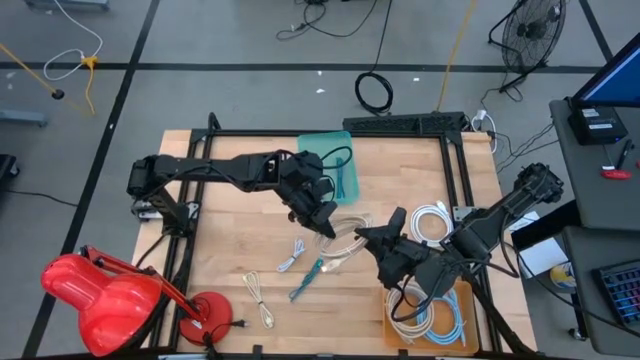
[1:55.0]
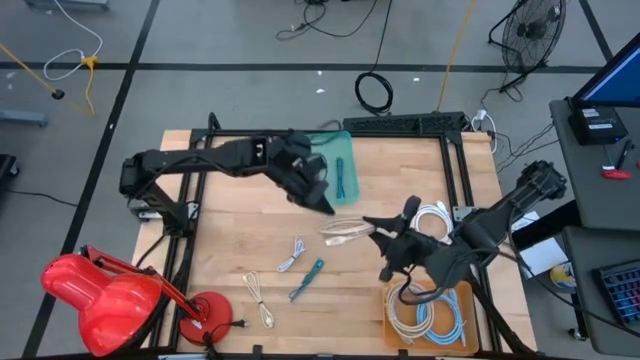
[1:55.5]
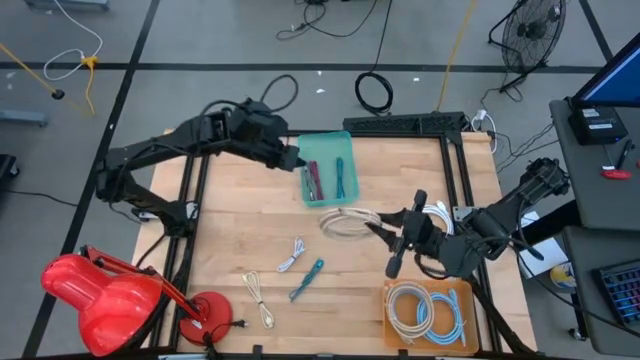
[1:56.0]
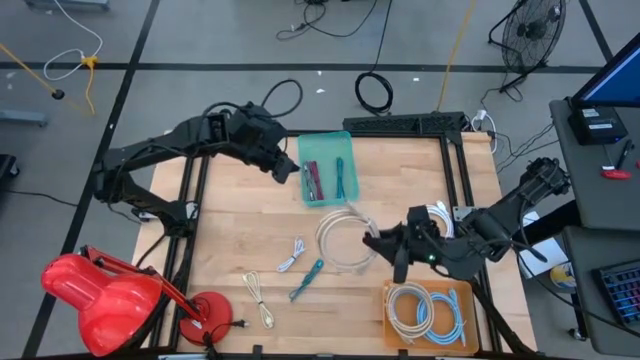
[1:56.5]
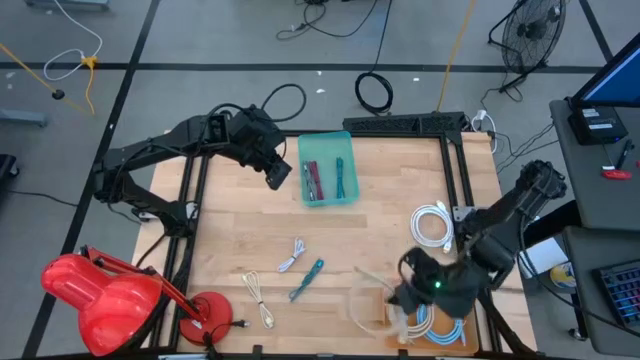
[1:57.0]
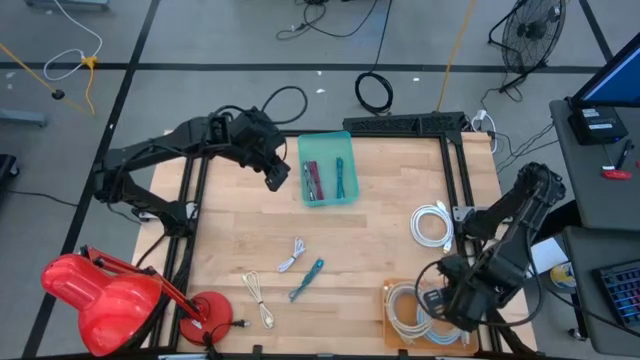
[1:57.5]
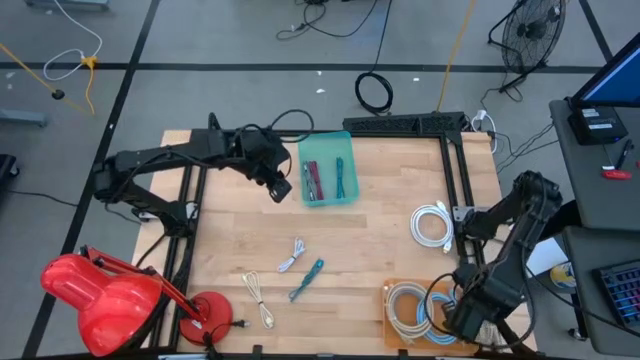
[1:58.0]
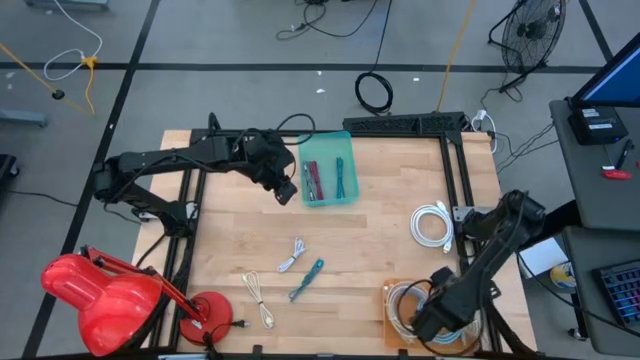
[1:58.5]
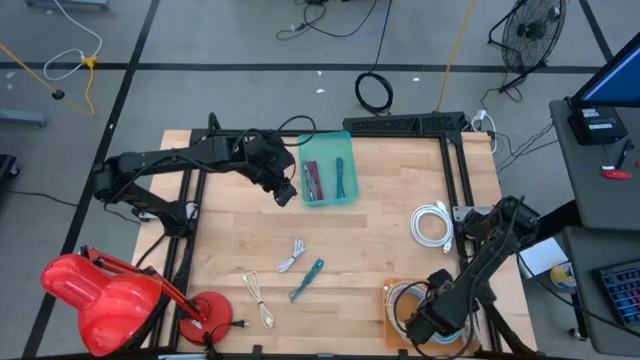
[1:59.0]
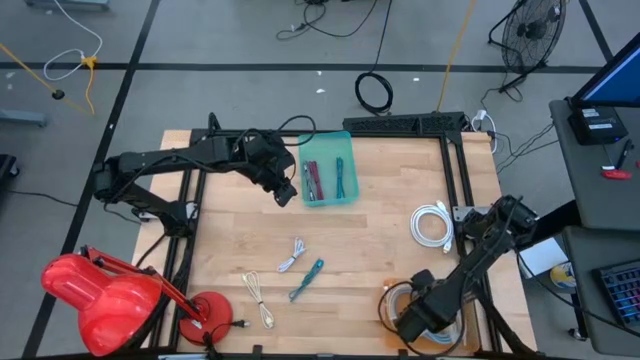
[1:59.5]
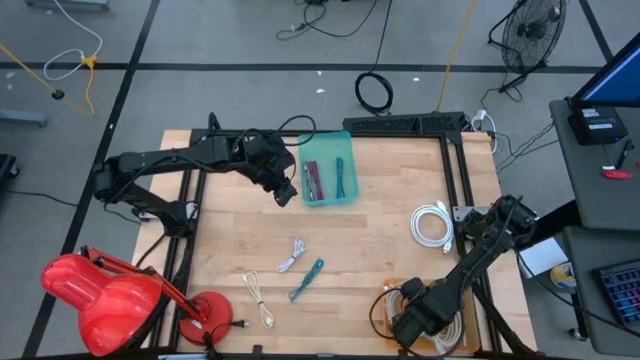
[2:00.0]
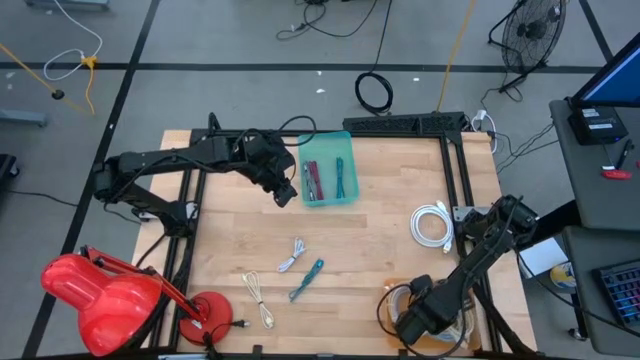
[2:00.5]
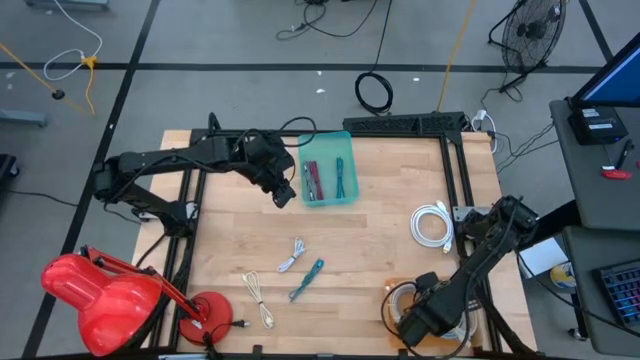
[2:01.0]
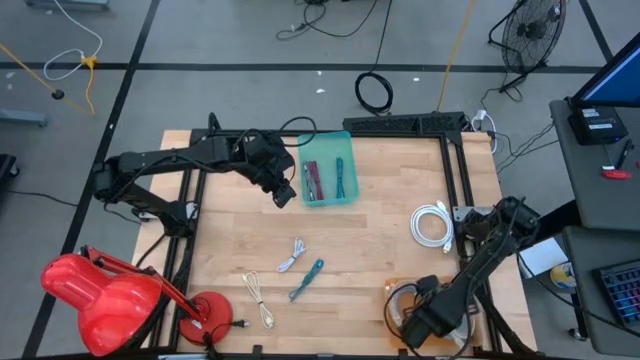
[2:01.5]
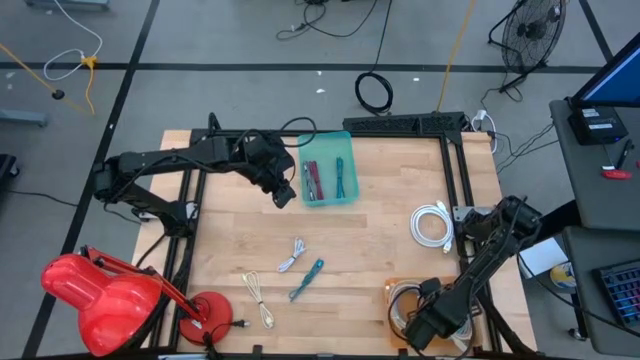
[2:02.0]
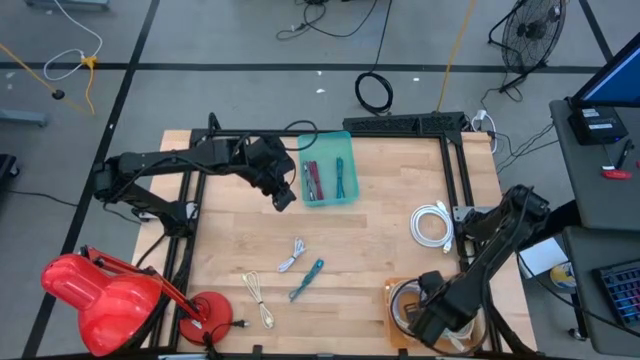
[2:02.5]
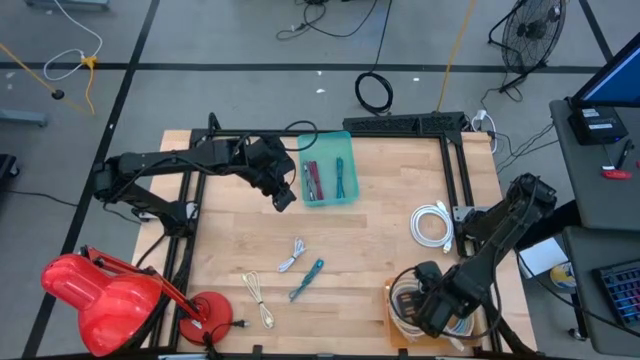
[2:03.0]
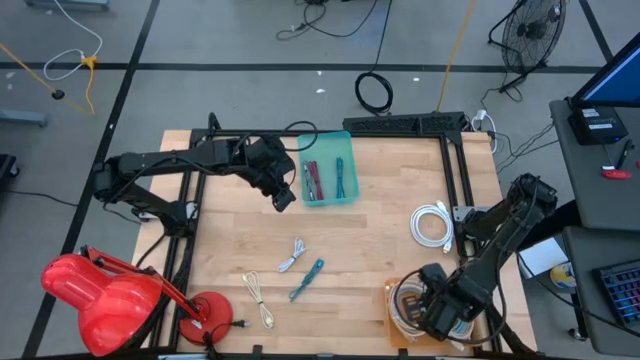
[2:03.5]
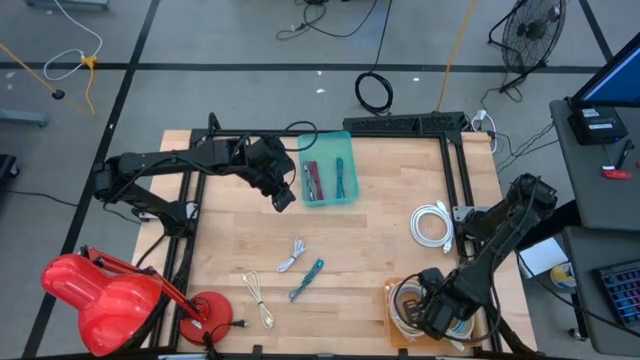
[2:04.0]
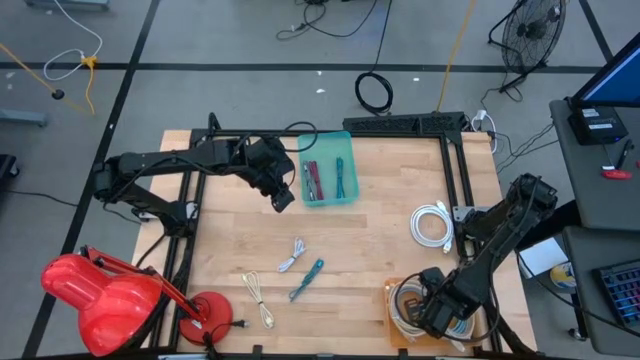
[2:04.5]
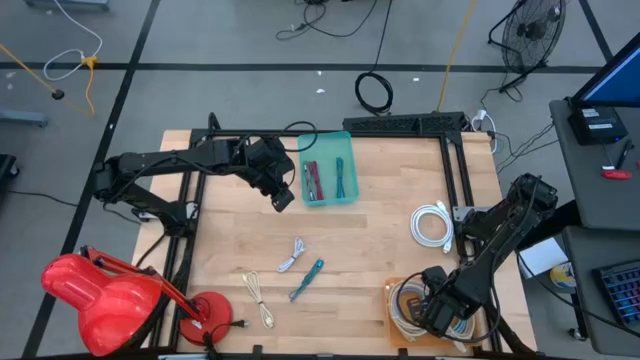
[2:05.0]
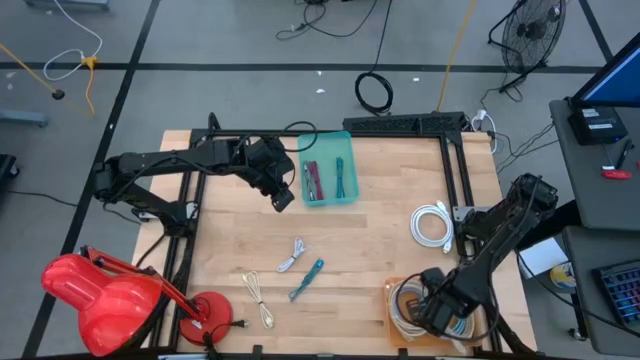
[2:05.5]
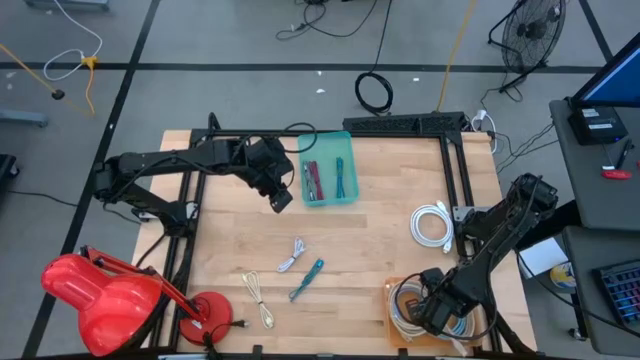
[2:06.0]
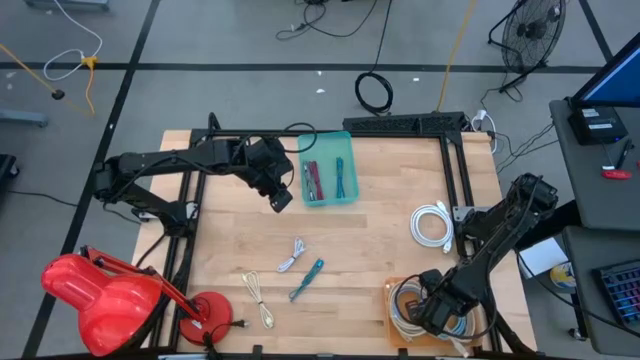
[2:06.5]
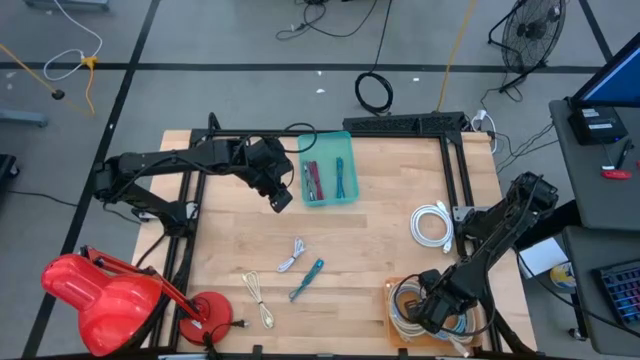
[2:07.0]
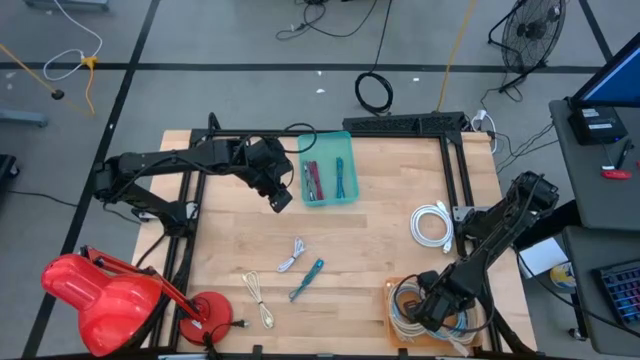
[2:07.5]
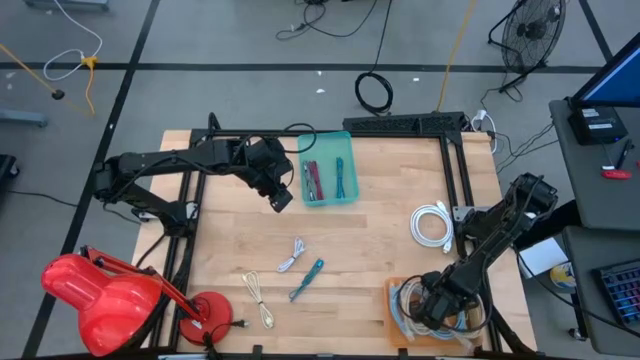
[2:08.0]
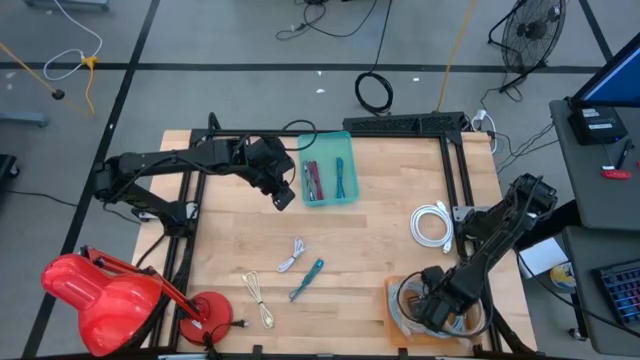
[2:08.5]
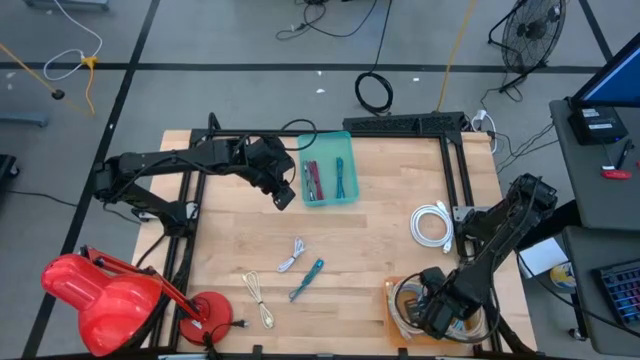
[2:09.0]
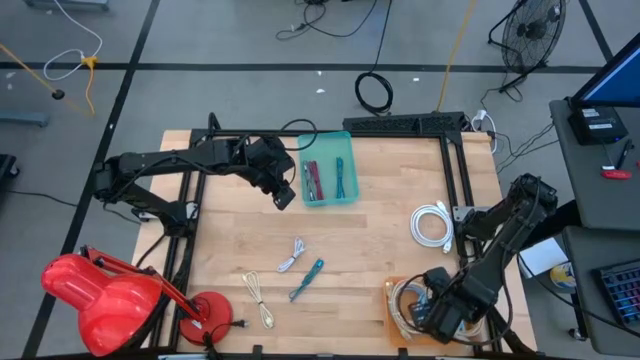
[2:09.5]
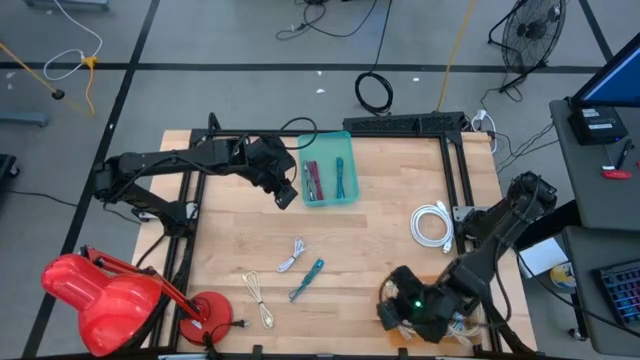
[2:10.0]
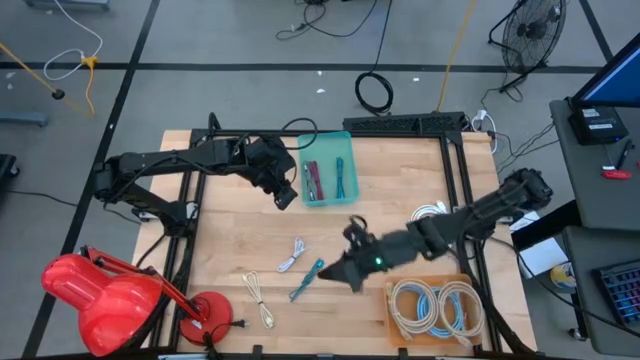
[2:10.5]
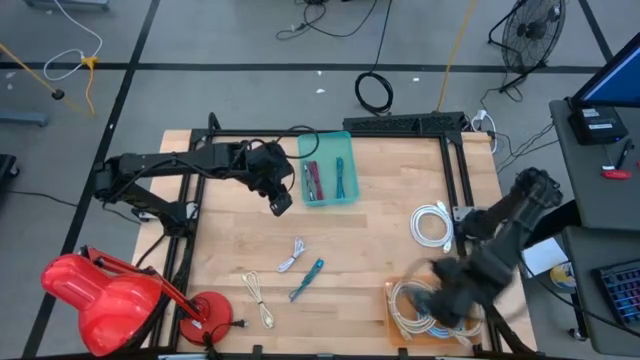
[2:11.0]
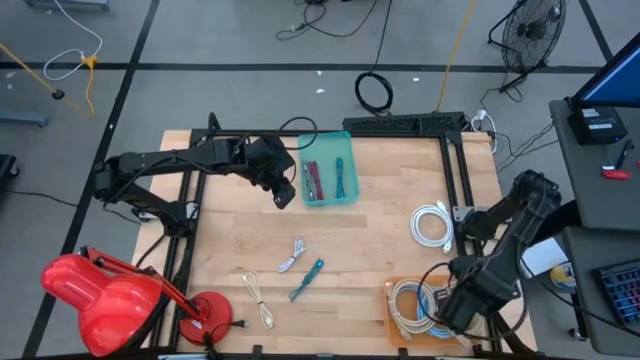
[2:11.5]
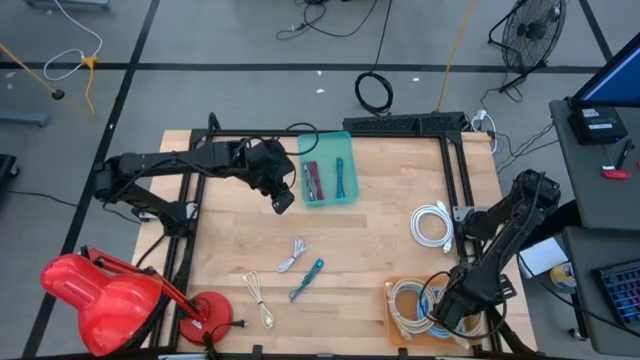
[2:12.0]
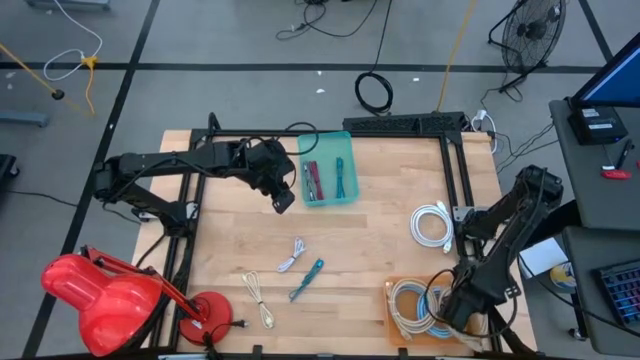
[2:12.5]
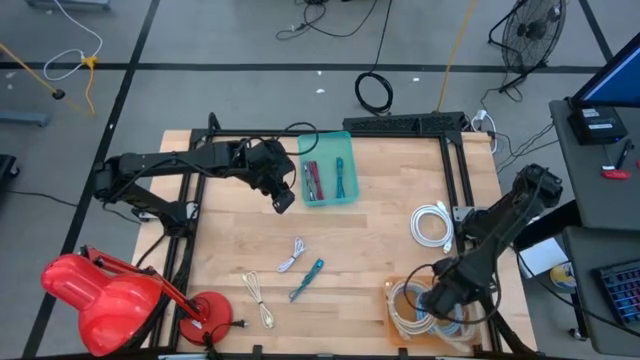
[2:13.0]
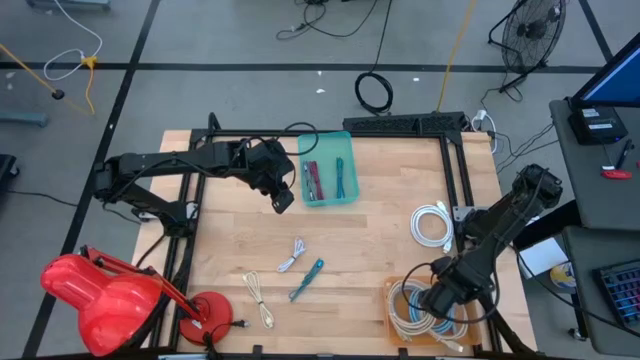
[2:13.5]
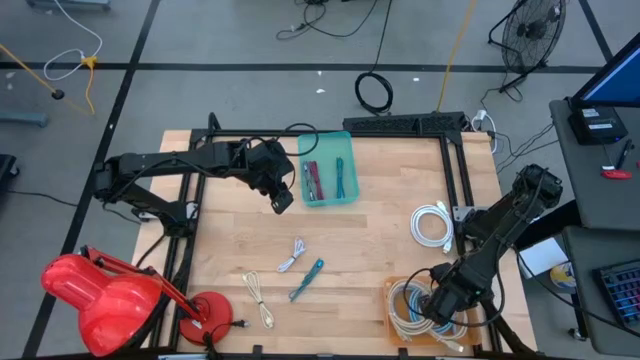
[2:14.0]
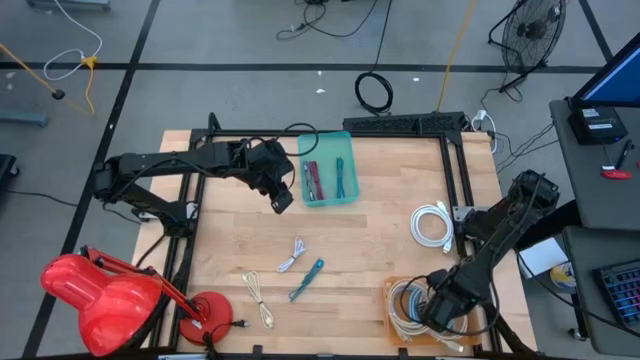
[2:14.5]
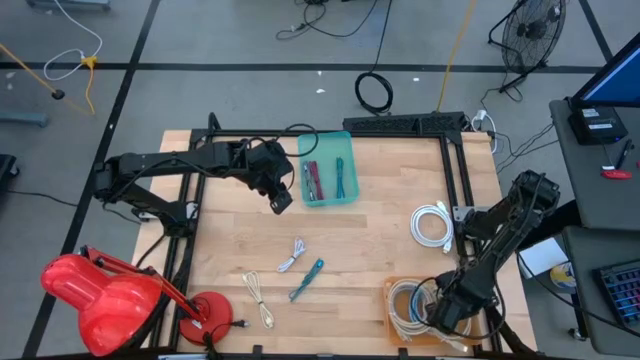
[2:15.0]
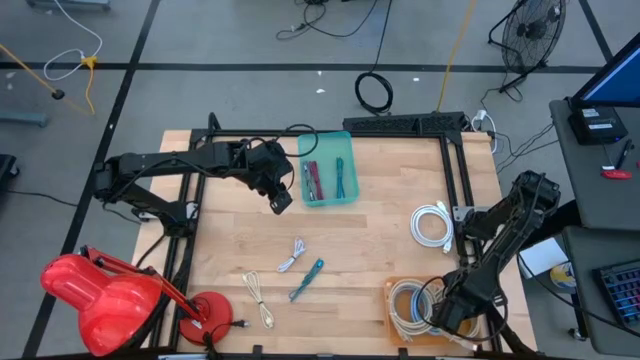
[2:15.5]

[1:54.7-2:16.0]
Task: Pick & Place USB Port
Put the right brown charger cable into the orange bin
